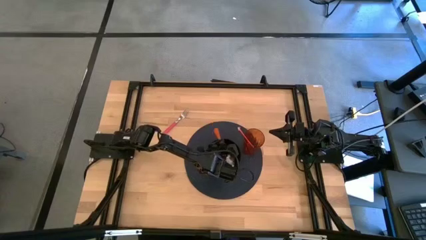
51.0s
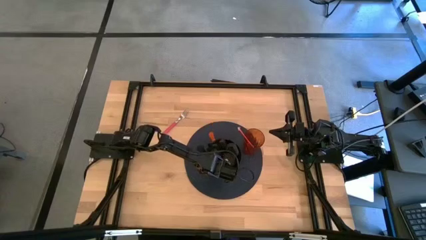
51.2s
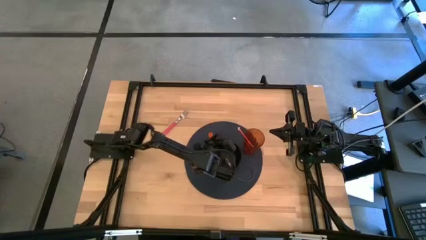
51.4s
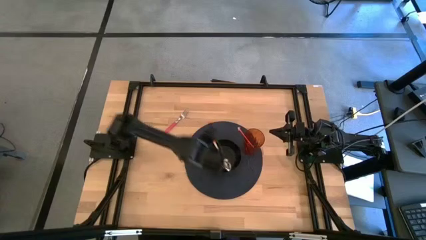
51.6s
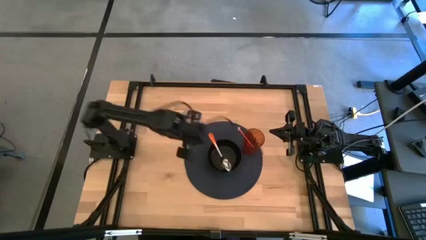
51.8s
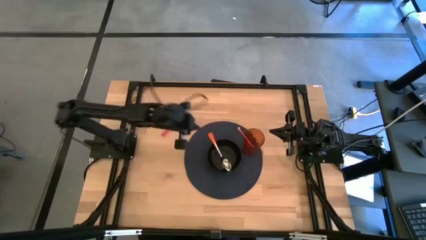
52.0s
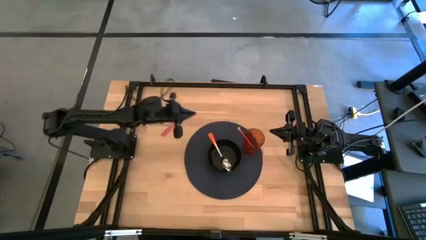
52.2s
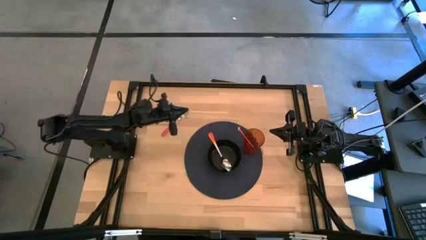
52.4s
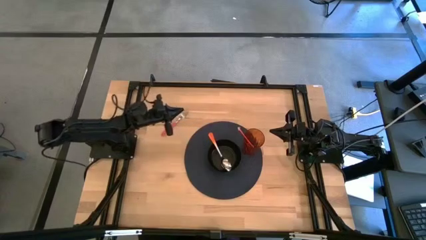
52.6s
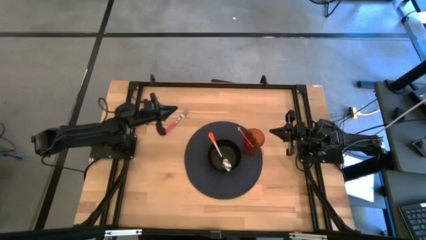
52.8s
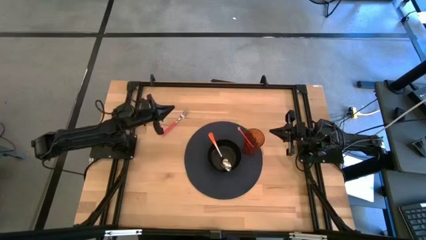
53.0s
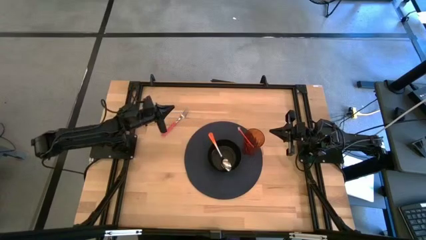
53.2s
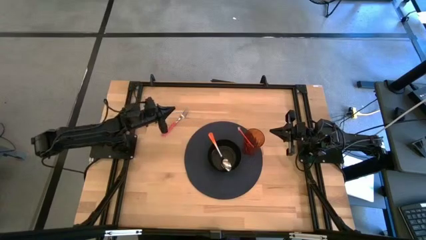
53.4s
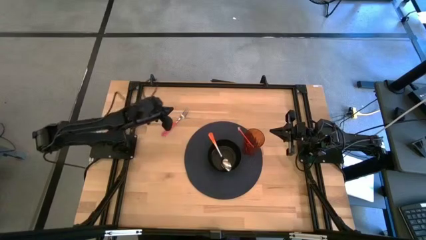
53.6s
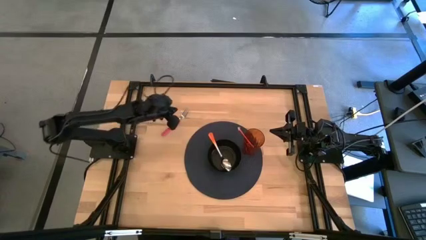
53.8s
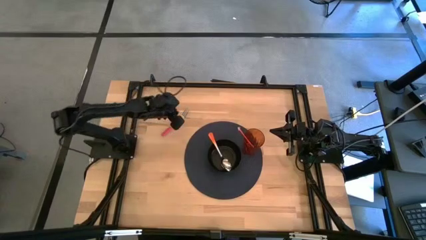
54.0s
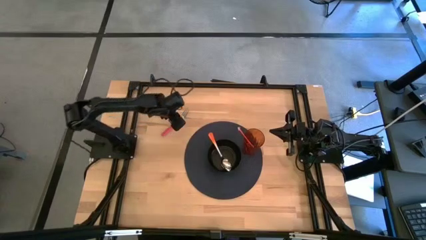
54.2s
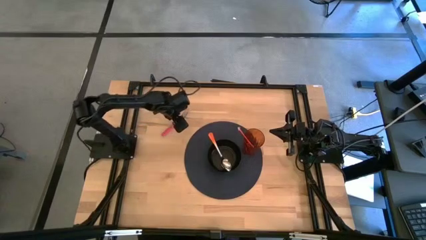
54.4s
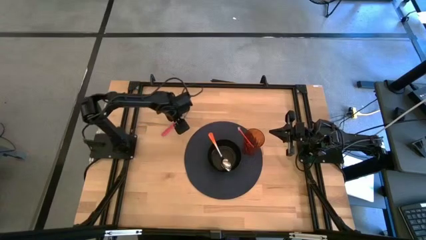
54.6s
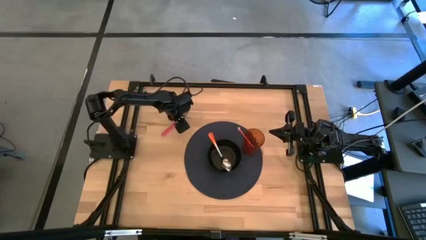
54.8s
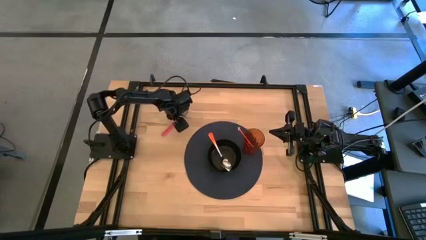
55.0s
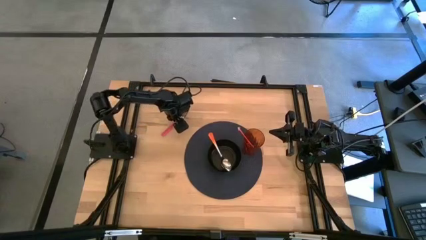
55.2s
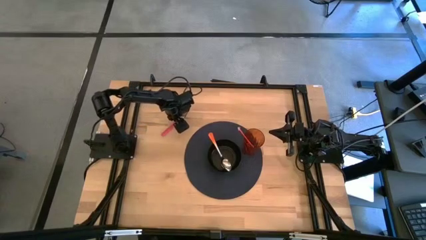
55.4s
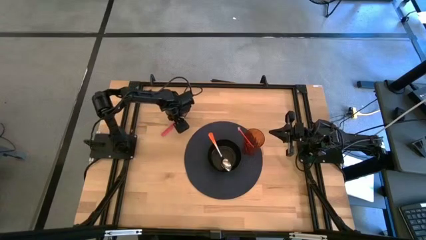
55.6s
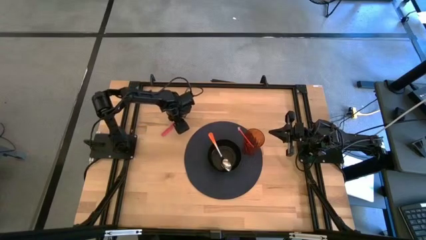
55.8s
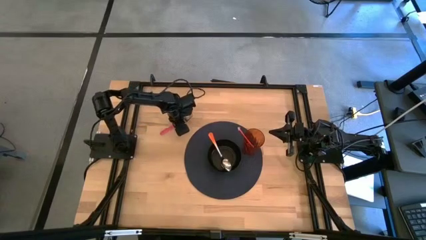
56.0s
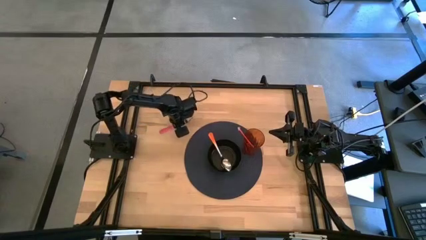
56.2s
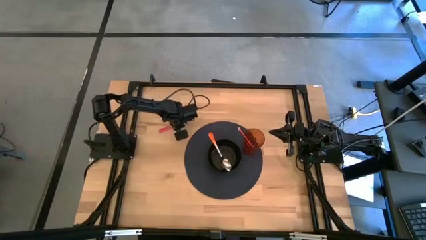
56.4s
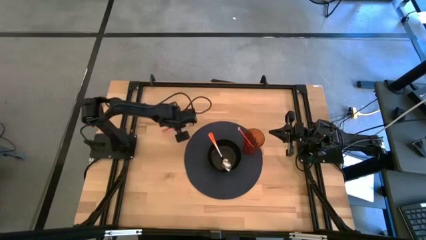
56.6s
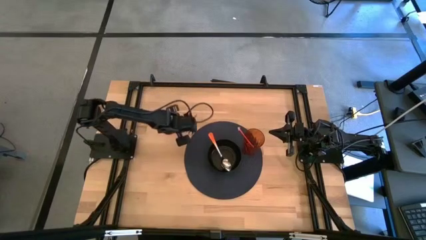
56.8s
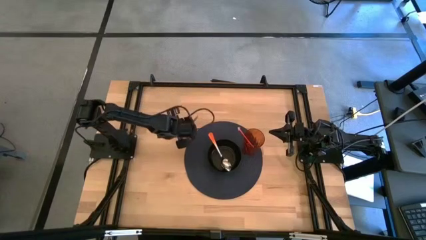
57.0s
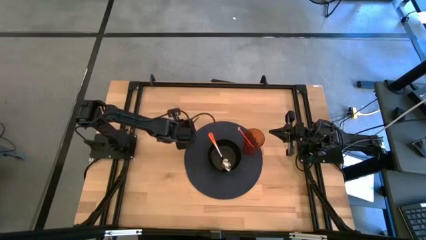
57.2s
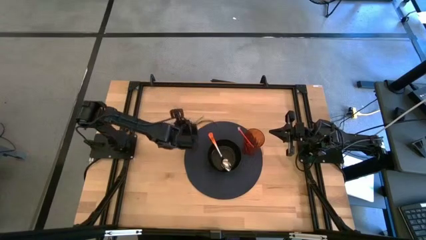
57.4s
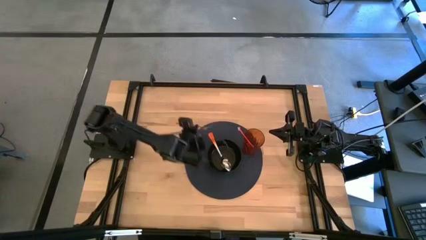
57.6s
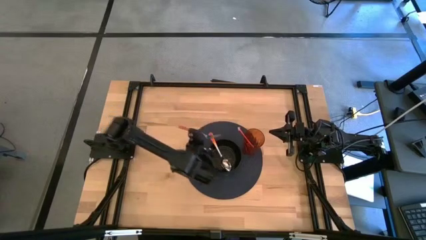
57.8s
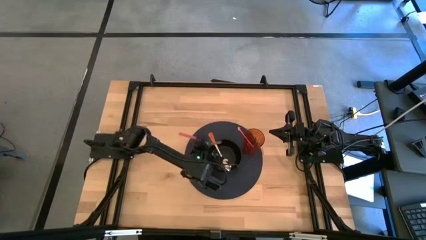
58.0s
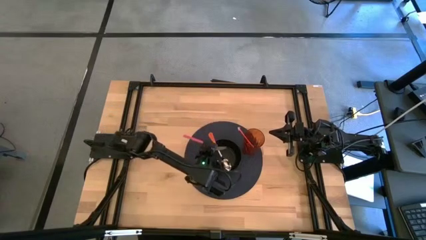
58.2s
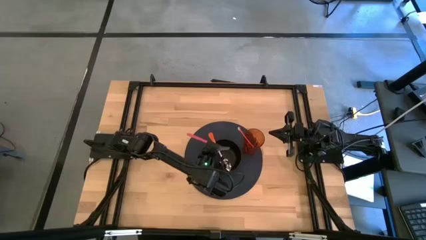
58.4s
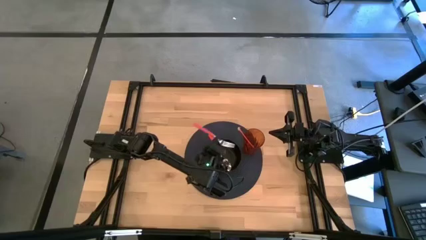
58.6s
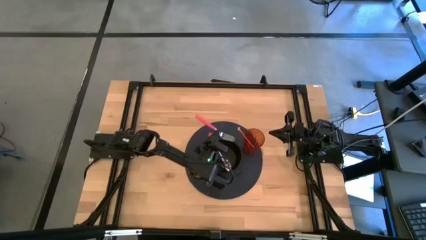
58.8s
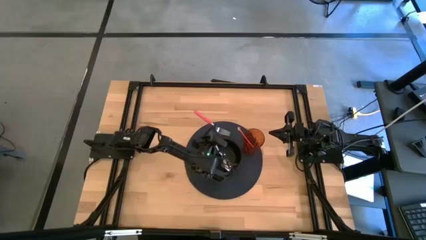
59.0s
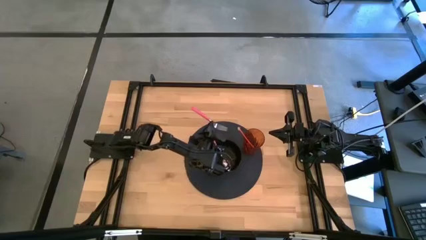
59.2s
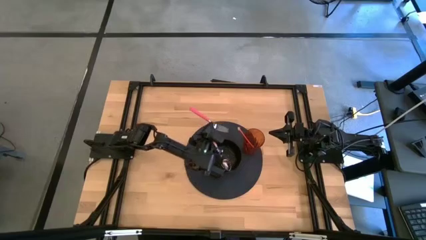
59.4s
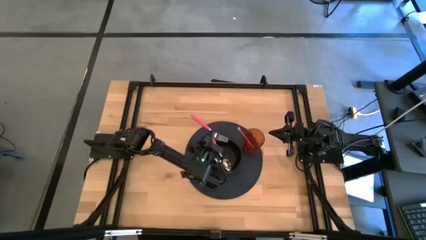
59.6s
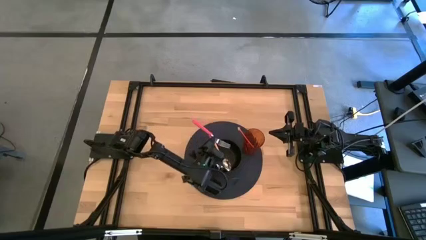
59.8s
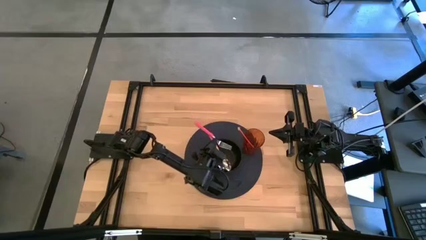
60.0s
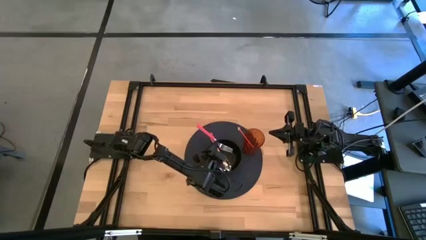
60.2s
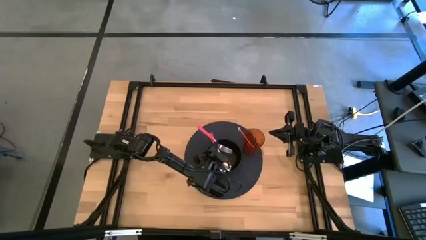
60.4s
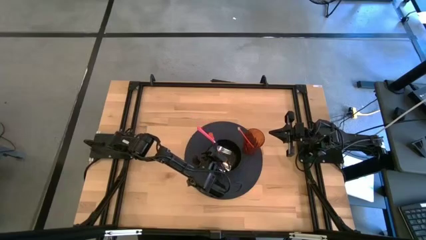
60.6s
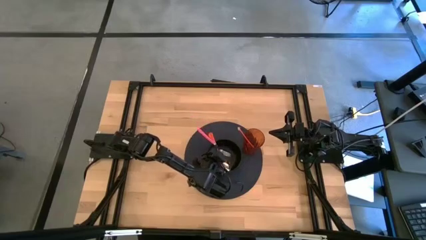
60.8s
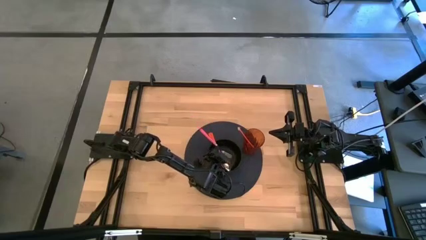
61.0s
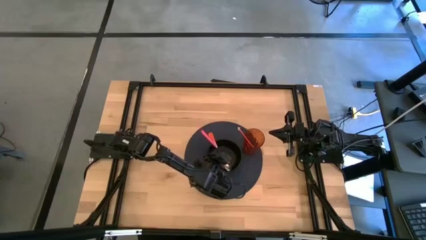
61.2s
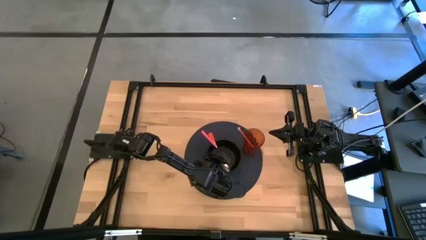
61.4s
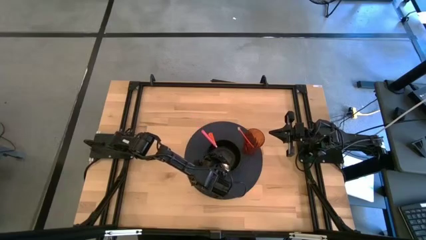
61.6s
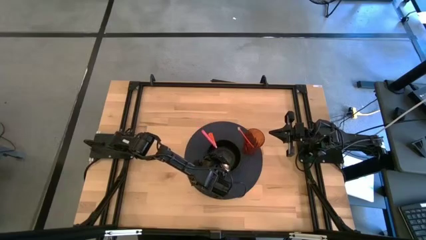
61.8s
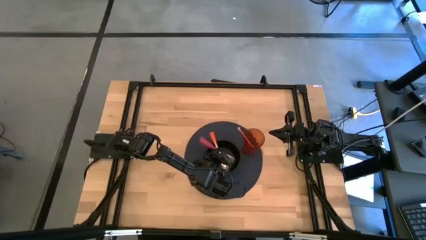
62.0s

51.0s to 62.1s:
Task: Pick & Place Utensil
Put the pink fork on the black bowl beside the orange spoon

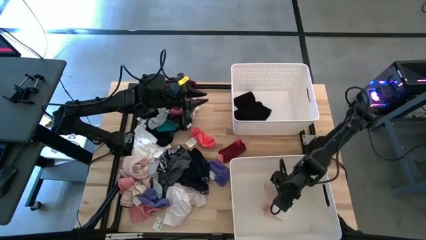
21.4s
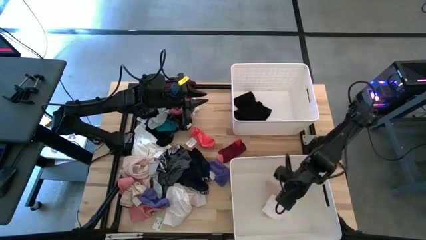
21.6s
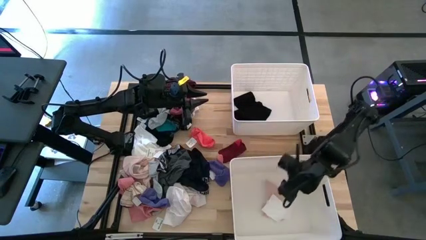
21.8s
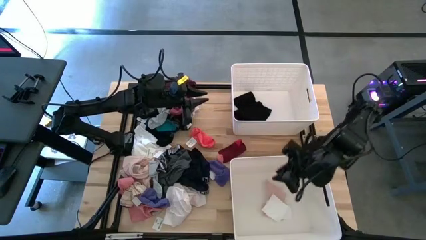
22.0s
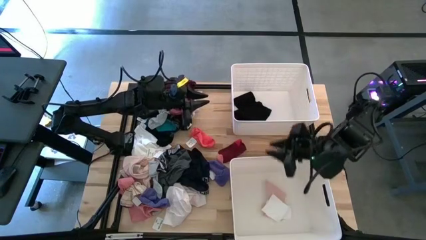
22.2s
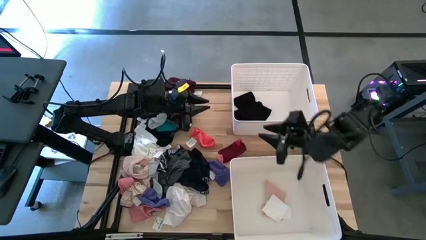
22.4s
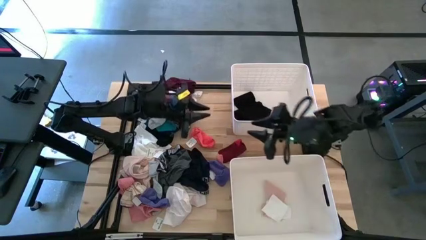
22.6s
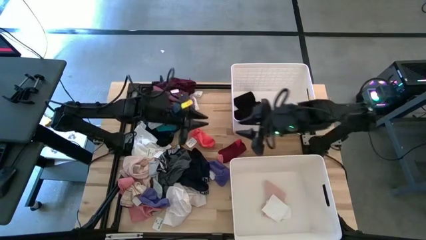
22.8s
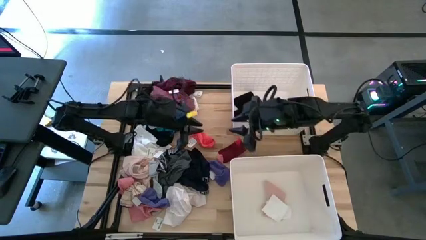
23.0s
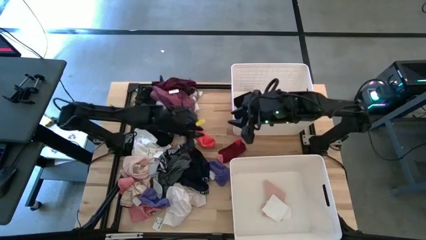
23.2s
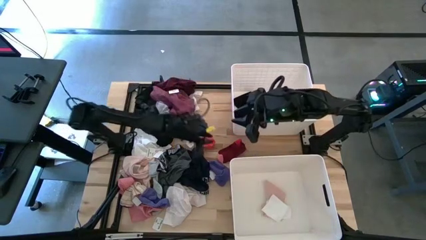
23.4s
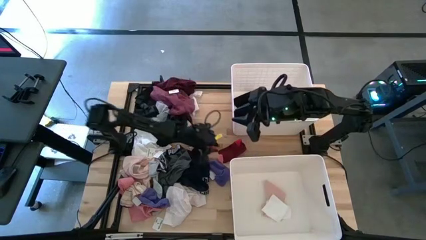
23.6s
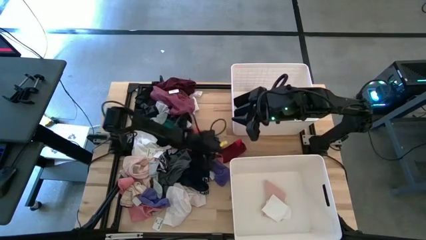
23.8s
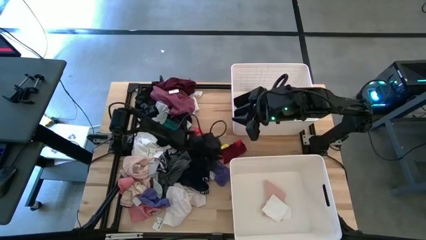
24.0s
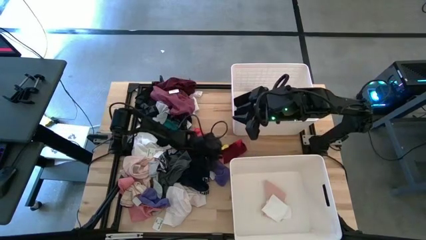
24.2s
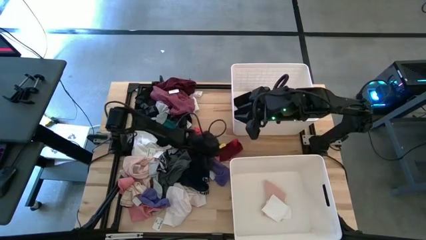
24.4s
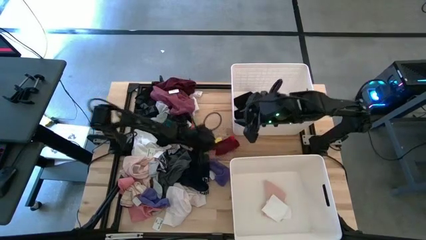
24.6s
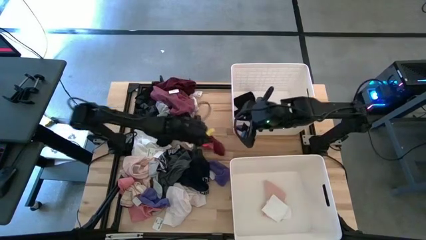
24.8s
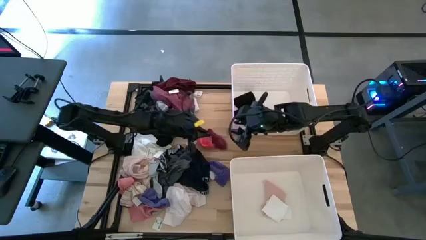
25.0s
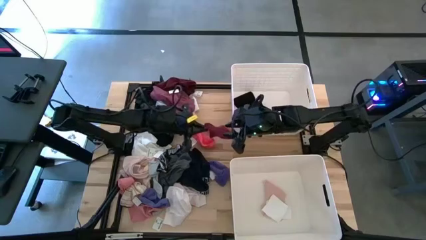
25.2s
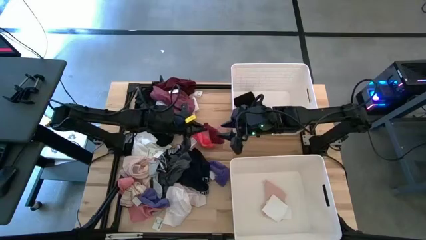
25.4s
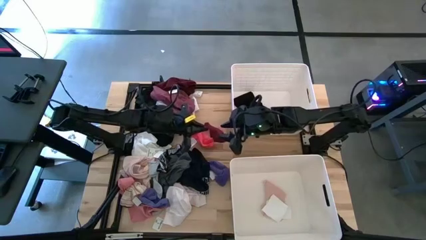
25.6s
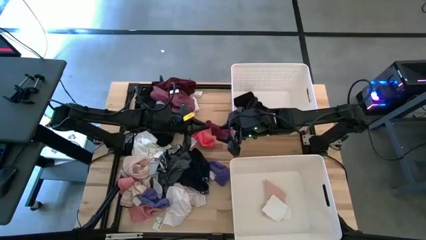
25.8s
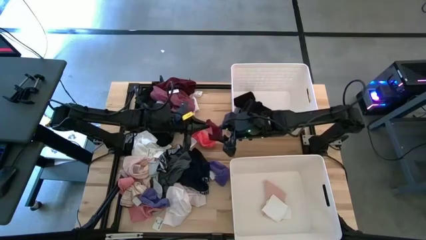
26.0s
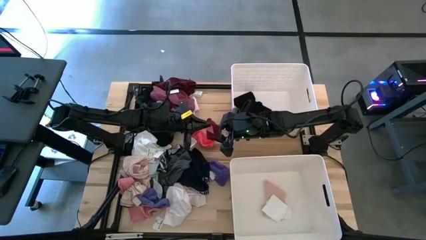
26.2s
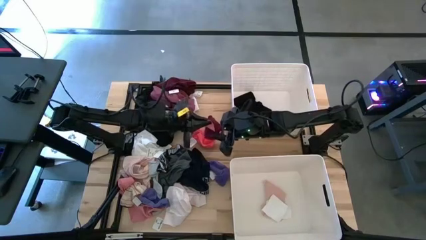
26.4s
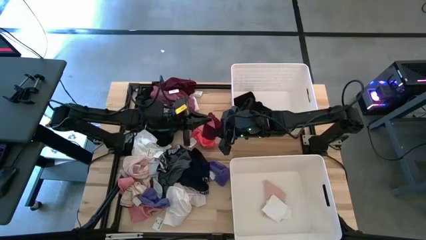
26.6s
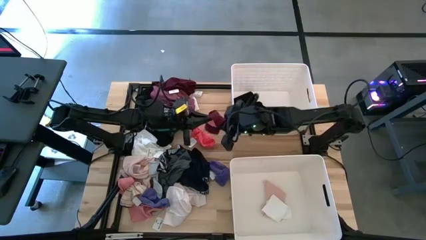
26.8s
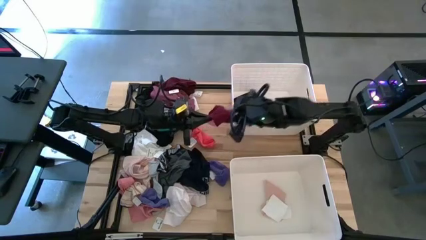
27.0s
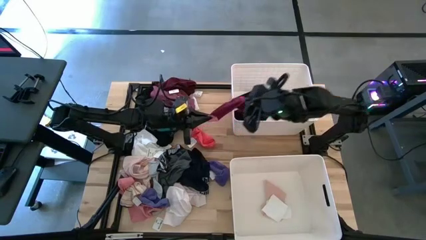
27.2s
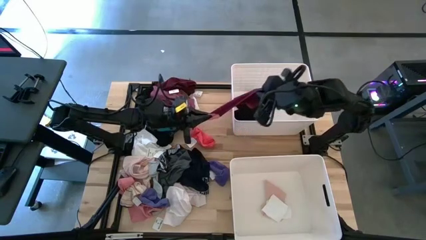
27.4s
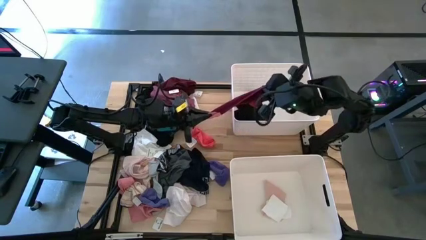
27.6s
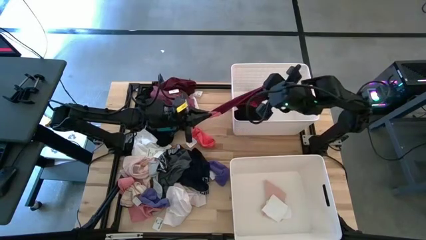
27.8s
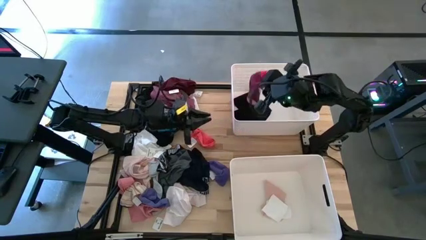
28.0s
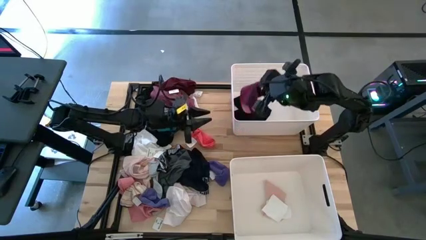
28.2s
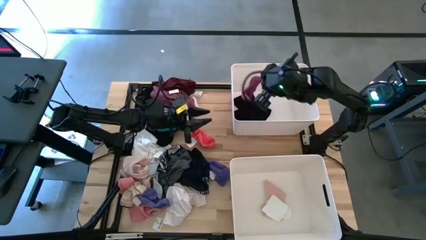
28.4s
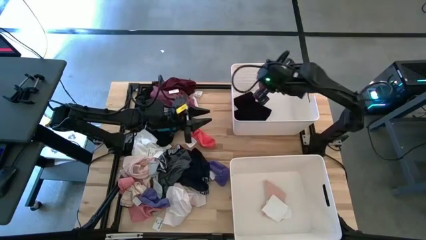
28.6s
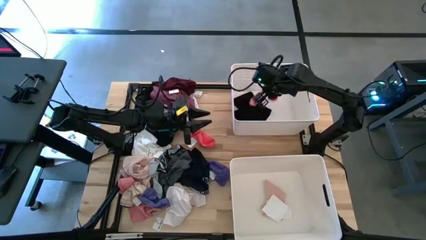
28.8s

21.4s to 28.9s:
Task: Sort clothes
Put the red sock into the top bin
